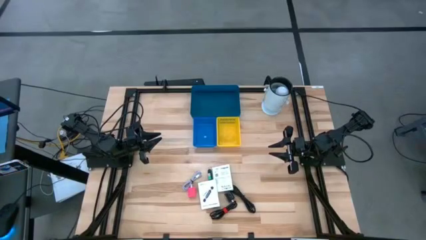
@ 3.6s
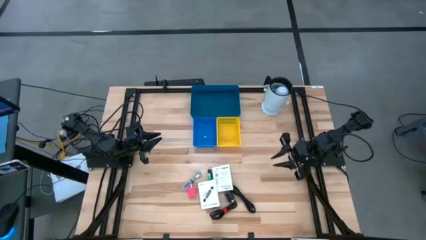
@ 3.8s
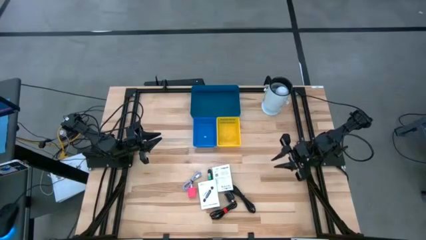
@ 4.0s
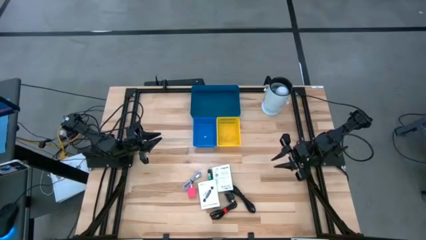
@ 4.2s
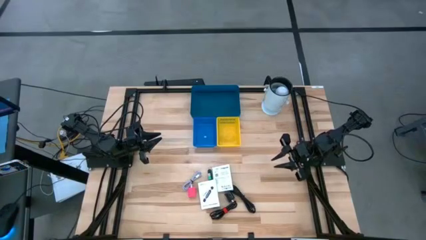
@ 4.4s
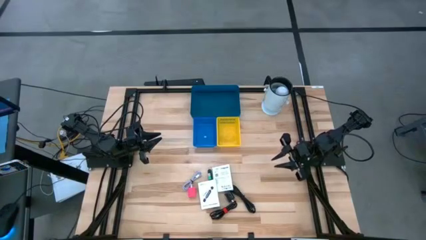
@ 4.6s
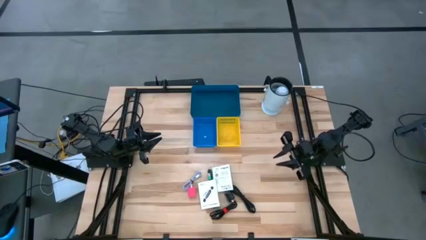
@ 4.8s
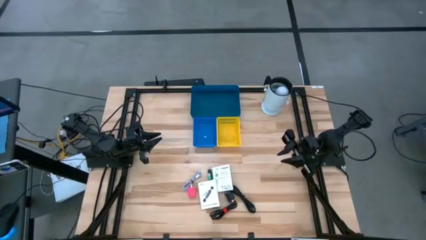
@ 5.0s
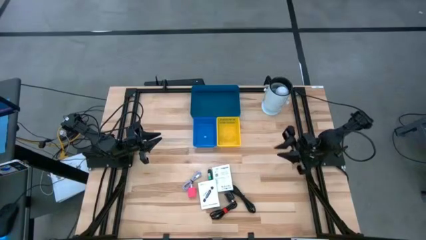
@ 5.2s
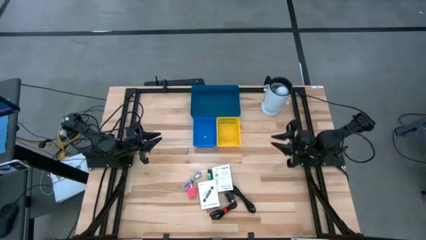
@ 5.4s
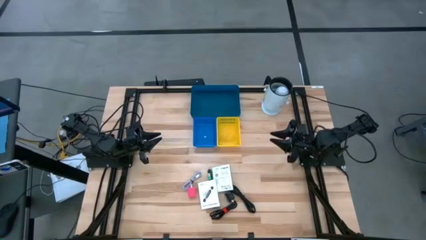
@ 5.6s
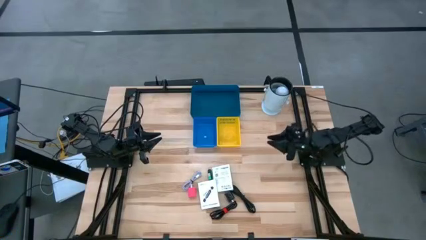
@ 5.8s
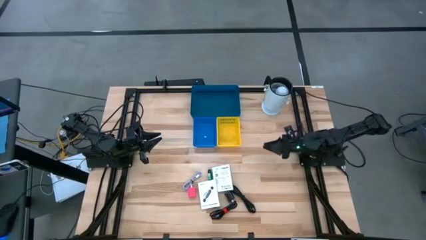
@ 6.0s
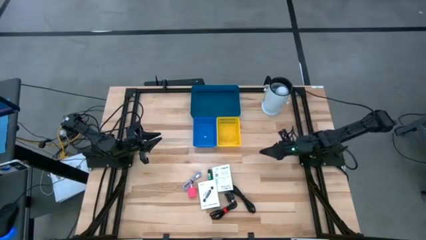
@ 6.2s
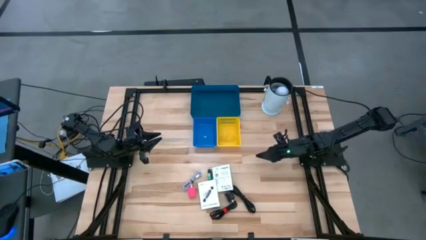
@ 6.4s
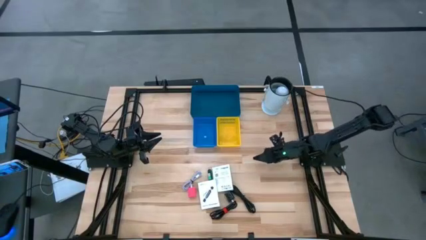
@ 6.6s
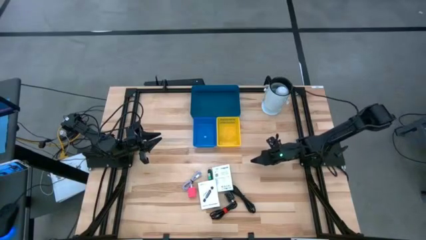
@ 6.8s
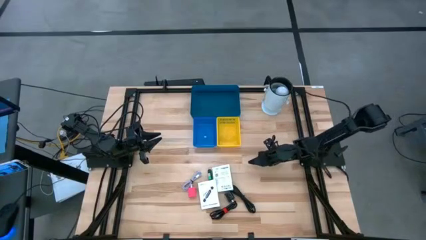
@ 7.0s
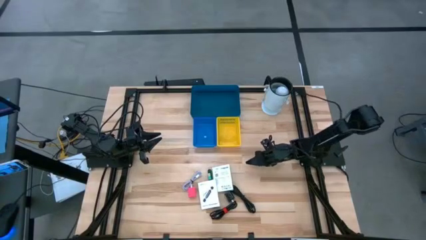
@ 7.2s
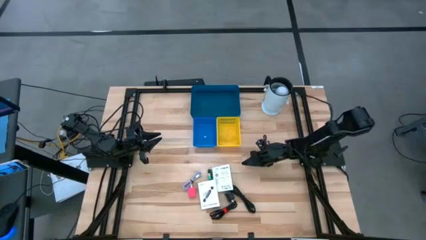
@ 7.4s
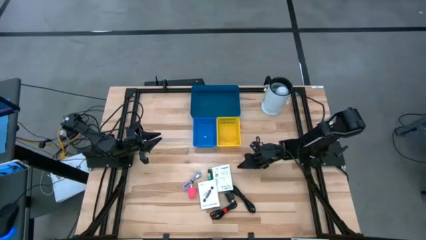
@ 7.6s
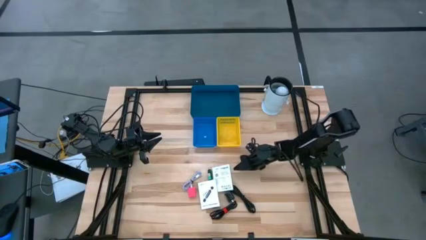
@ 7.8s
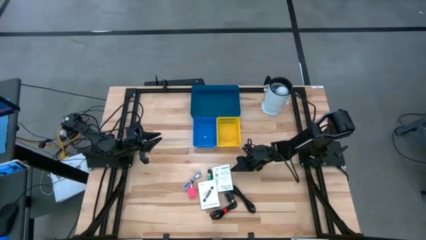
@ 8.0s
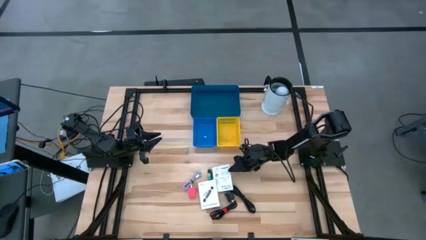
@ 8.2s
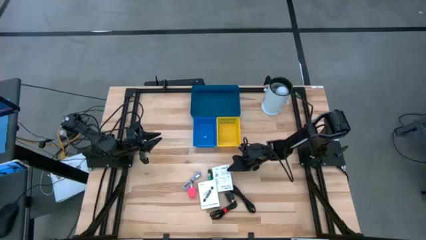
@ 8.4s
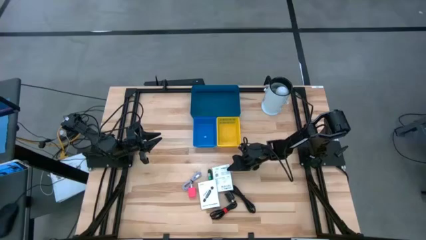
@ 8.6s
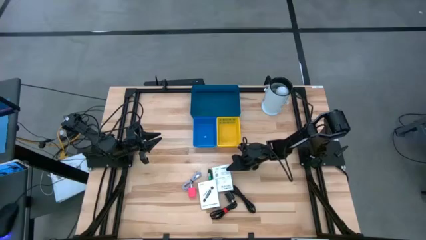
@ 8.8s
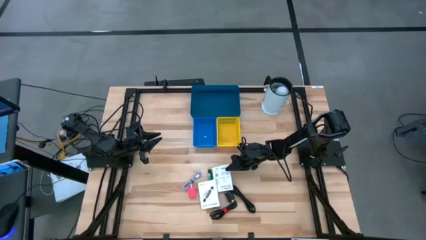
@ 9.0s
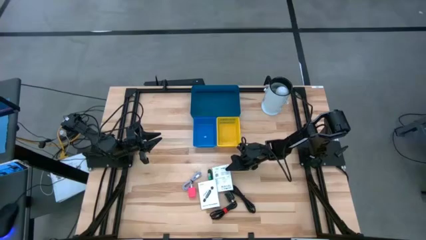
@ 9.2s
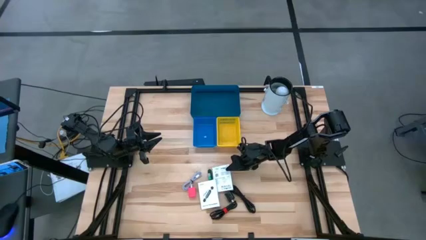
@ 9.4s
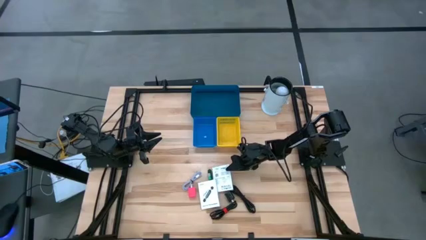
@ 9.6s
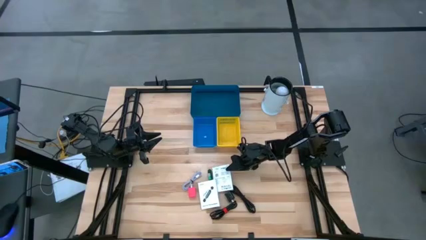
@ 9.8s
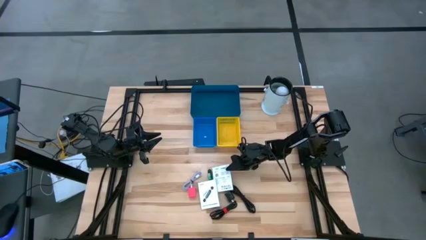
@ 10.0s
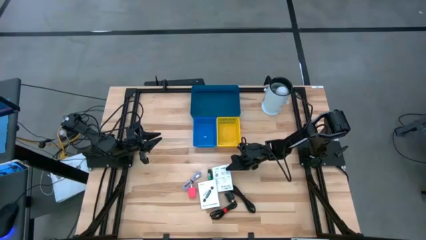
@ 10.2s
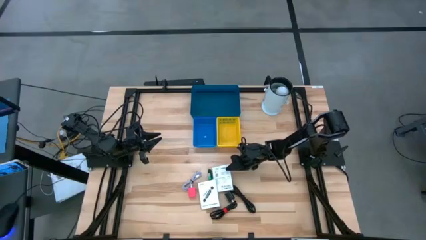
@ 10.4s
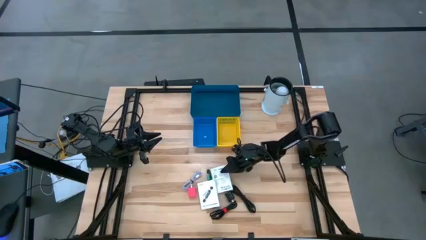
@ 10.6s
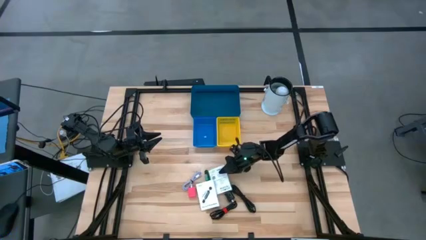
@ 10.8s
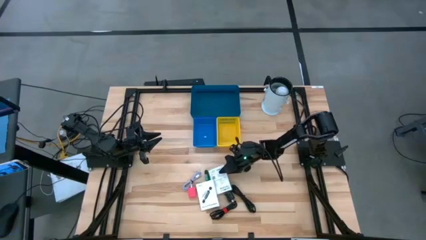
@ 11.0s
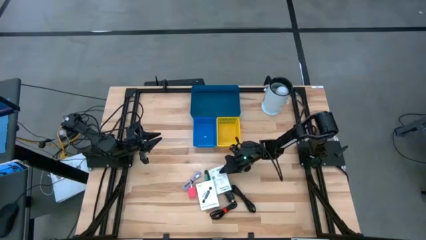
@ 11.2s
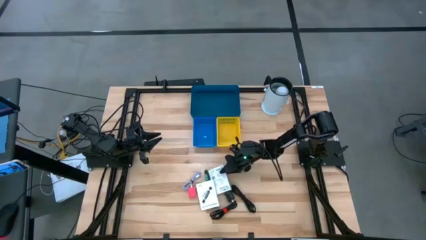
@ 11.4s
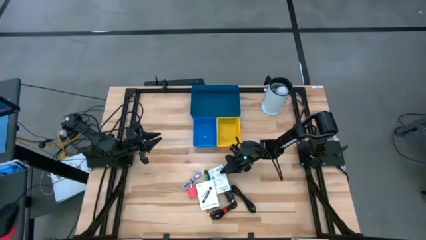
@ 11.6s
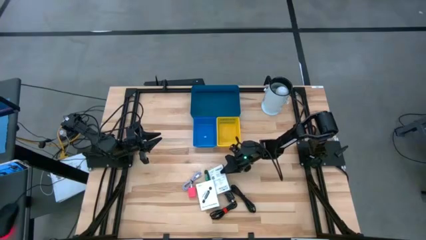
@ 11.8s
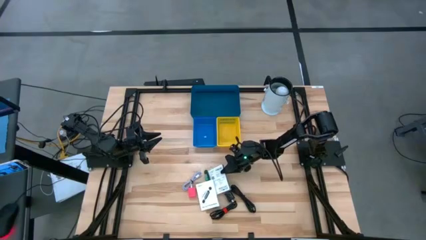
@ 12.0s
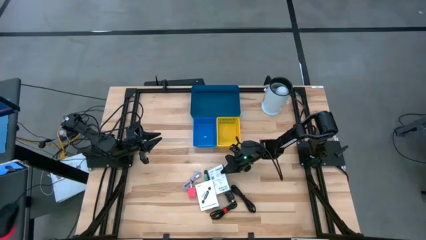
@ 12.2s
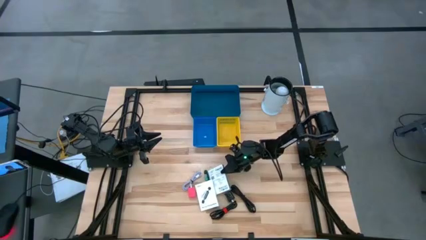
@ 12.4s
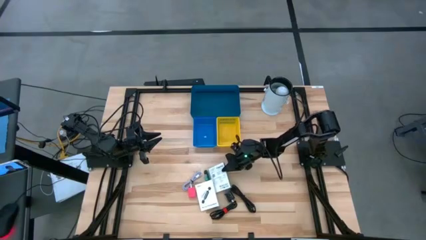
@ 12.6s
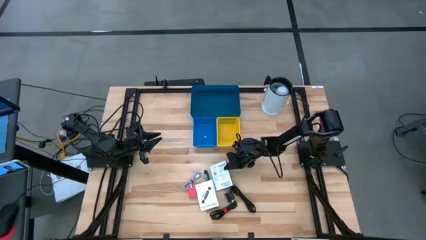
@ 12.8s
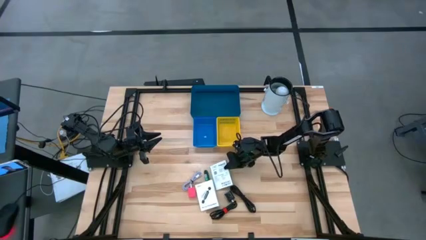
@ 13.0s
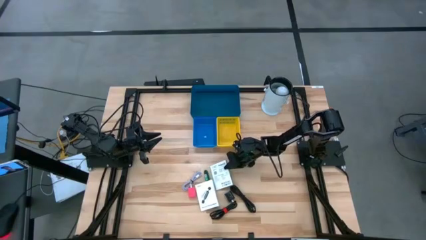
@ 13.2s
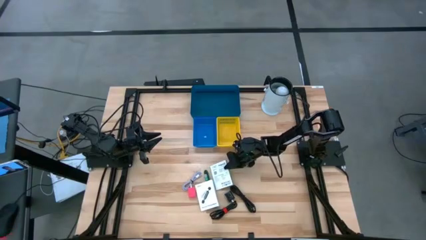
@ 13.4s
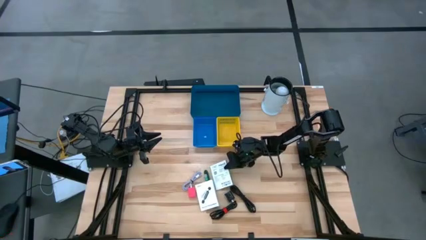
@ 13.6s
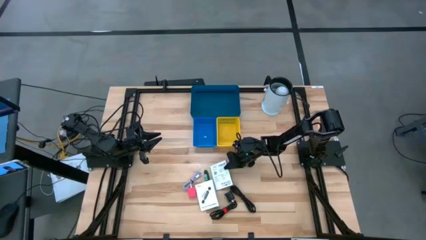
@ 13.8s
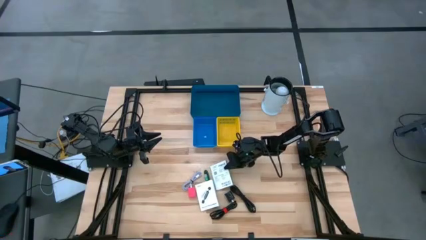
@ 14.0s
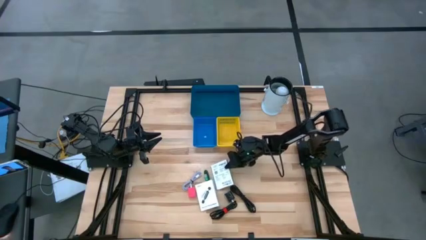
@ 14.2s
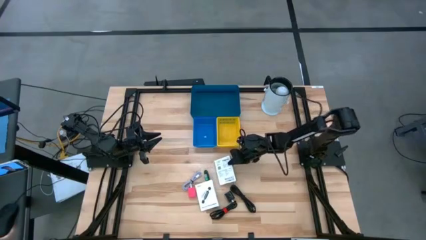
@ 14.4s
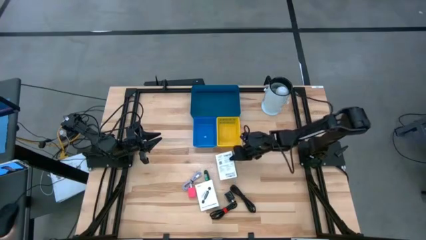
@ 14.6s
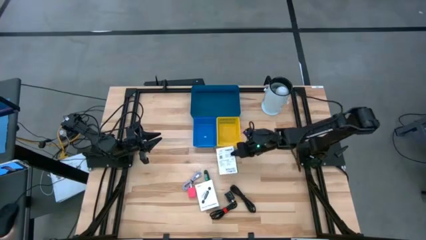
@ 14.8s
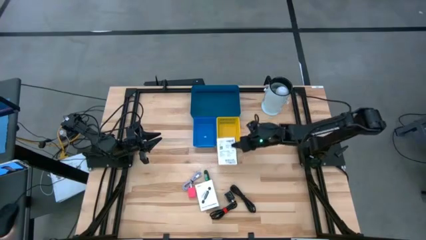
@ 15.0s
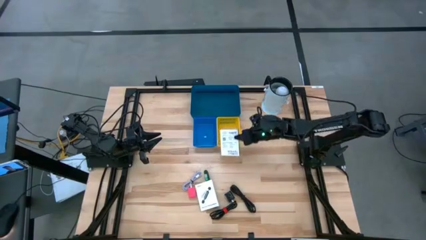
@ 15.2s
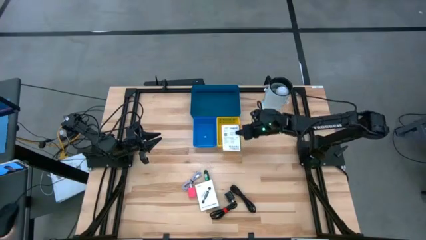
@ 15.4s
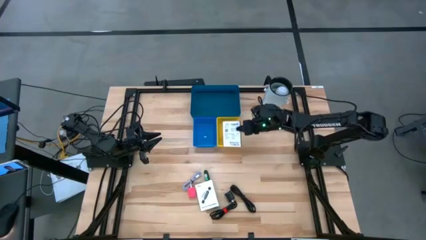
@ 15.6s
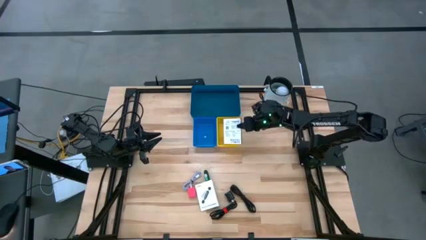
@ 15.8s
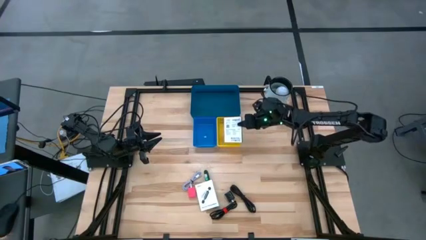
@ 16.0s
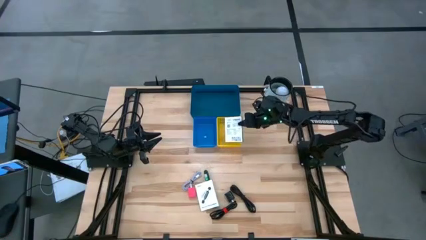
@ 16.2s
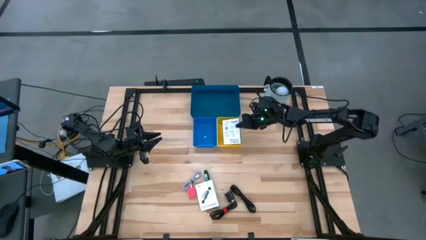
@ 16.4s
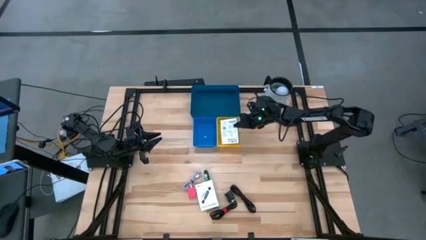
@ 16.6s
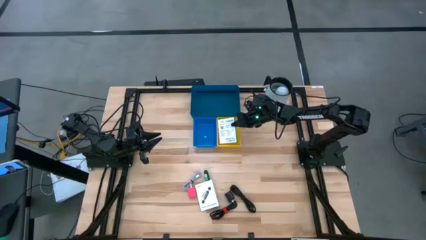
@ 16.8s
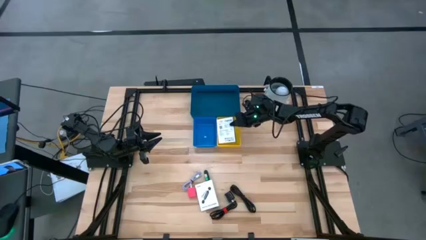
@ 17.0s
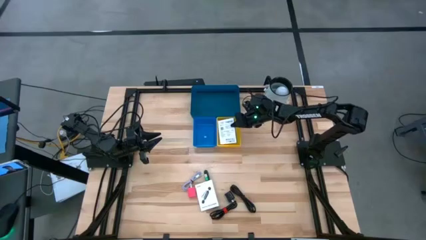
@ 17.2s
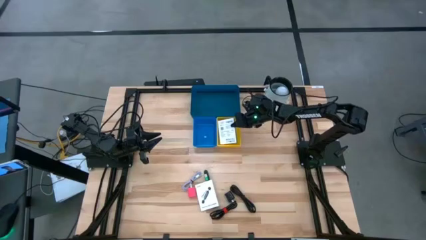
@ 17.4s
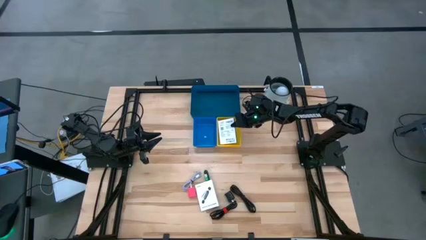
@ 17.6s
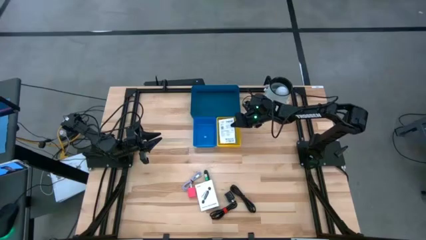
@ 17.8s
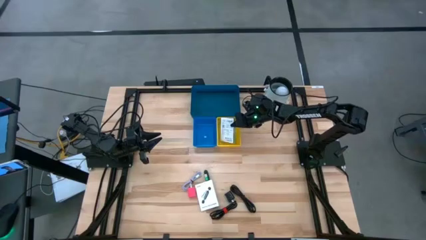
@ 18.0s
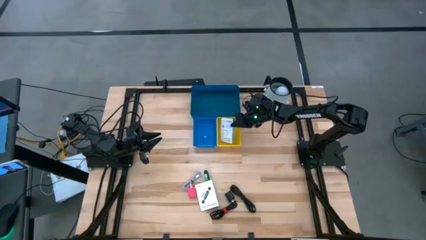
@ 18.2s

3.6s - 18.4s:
Task: Pick and place items into bin
Put the right white card reader box into the yellow bin
